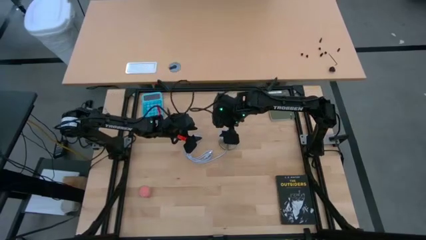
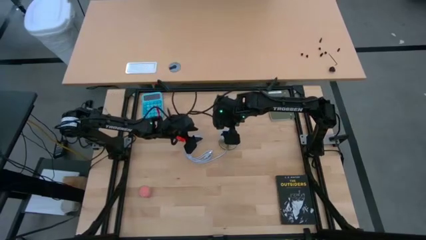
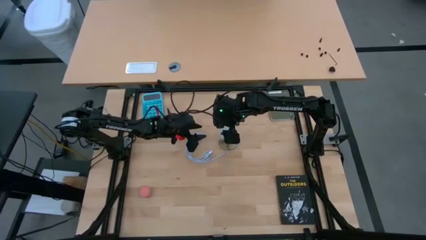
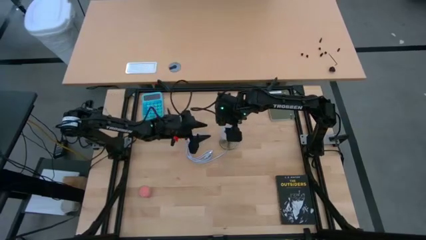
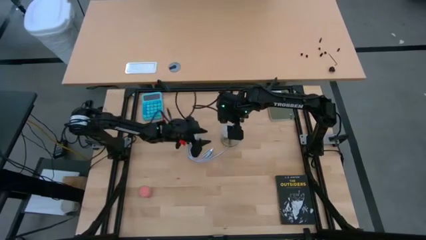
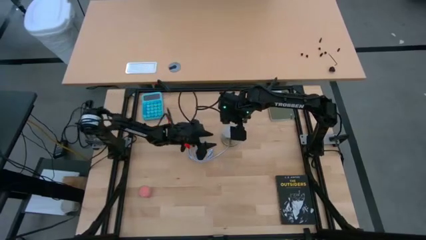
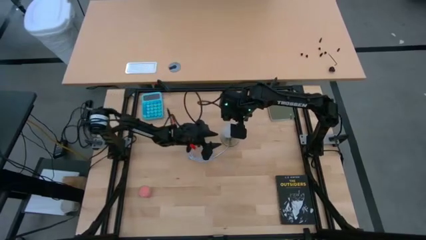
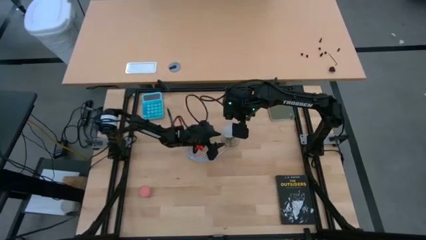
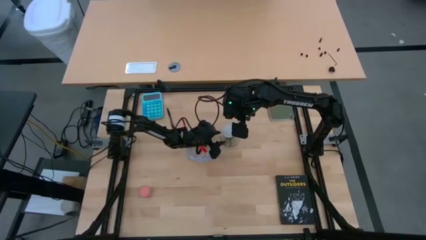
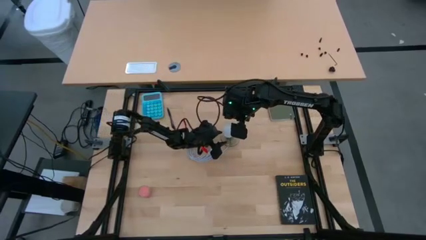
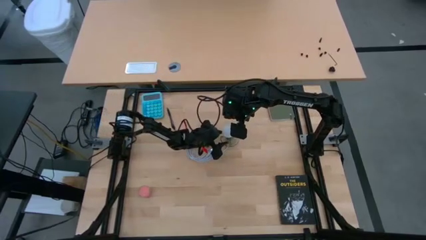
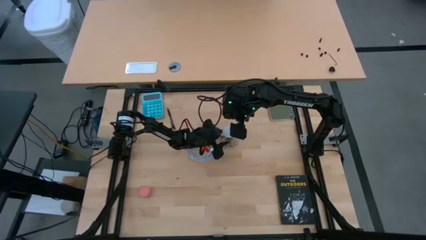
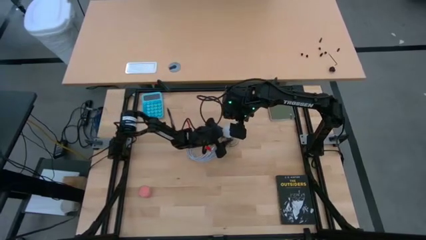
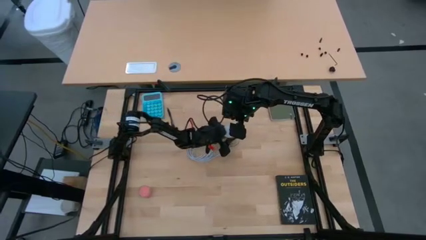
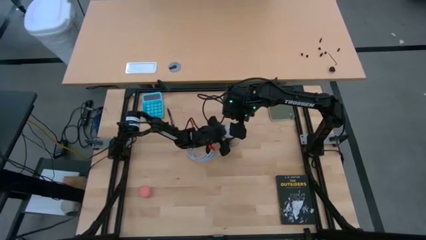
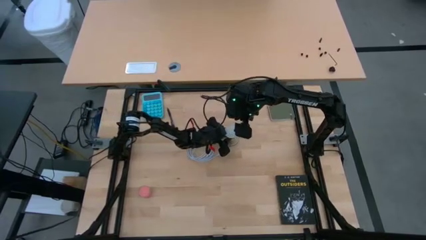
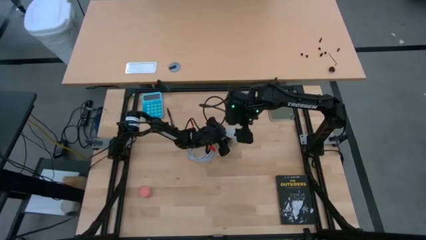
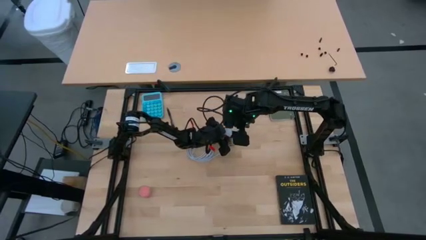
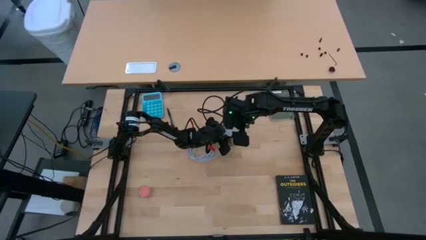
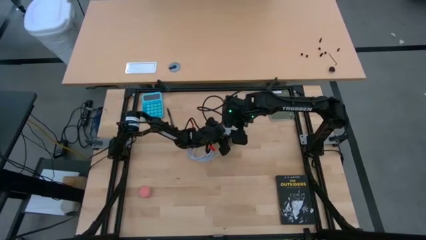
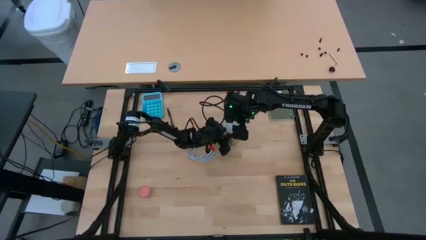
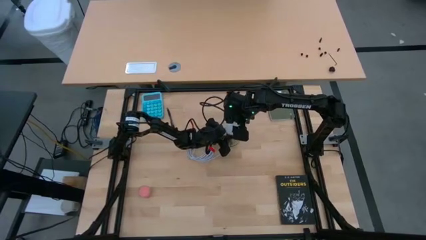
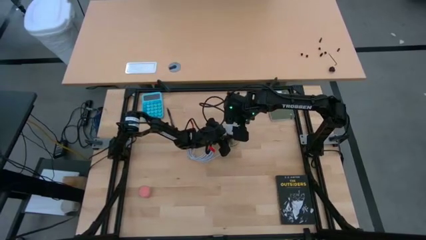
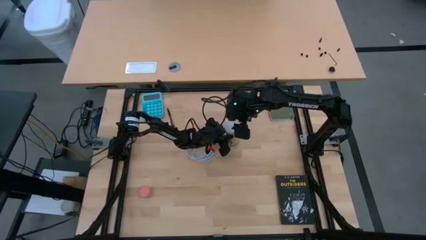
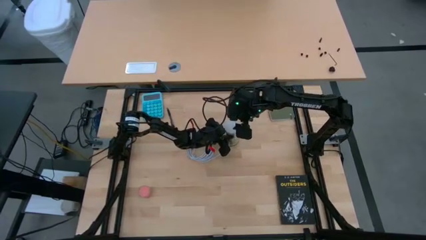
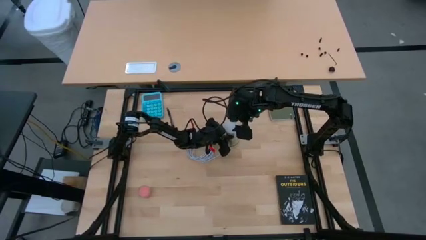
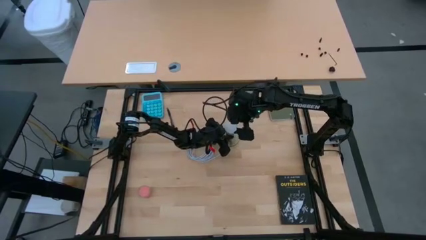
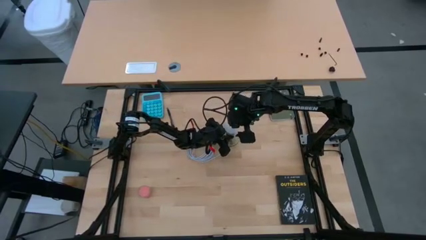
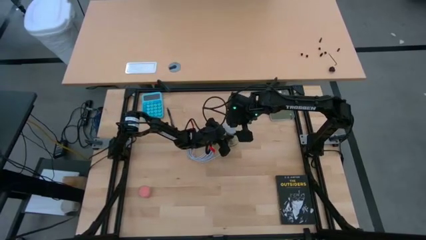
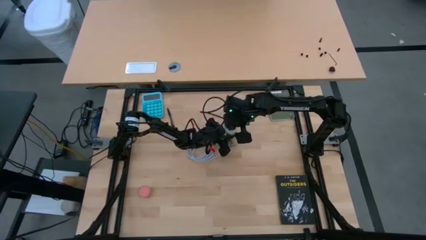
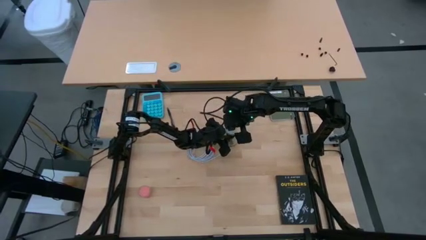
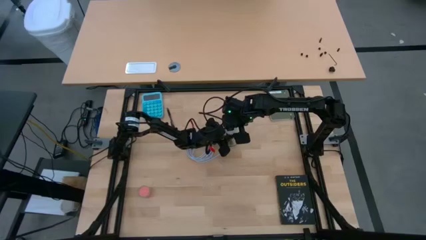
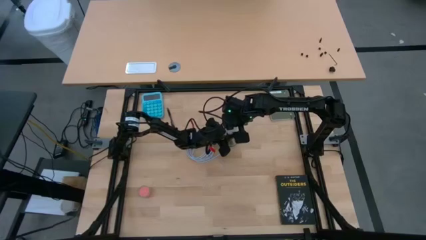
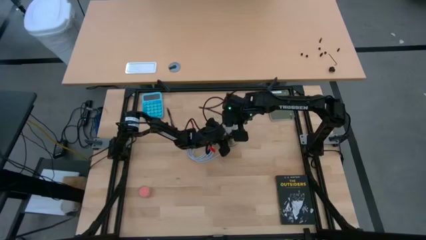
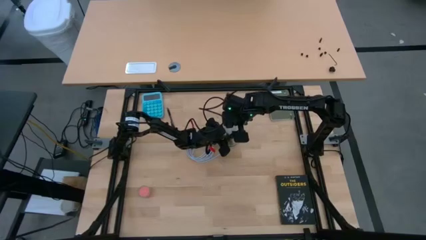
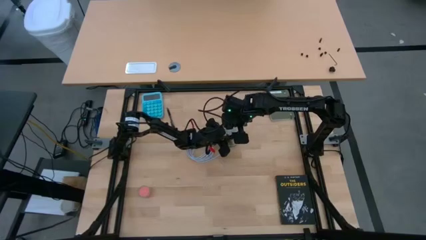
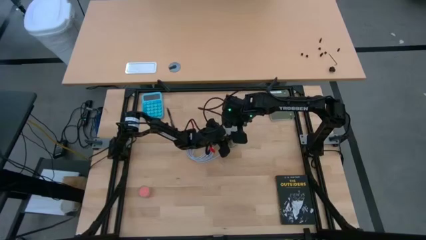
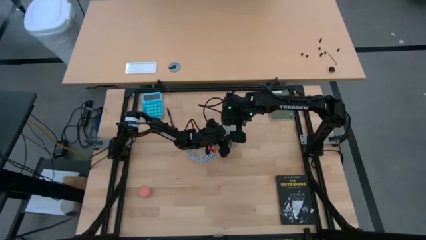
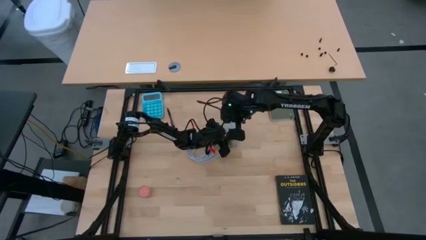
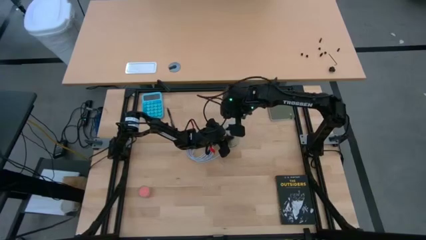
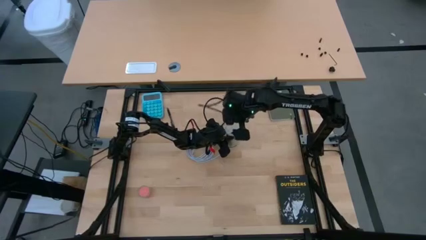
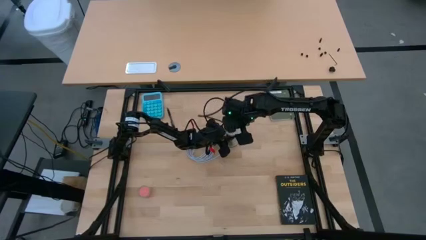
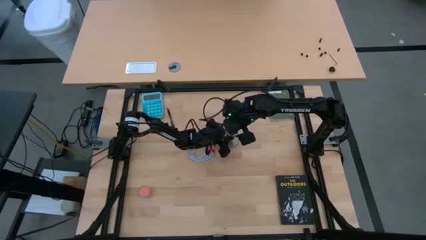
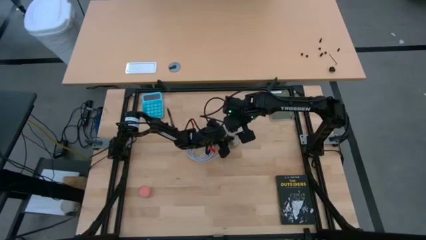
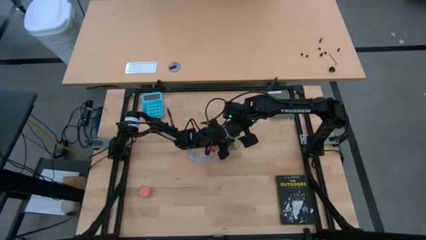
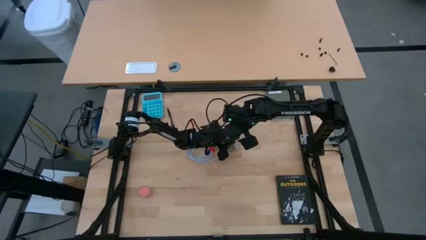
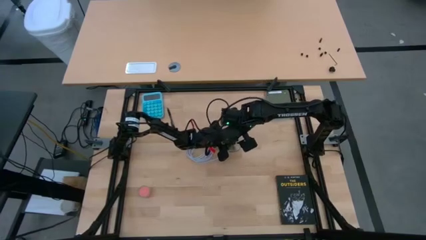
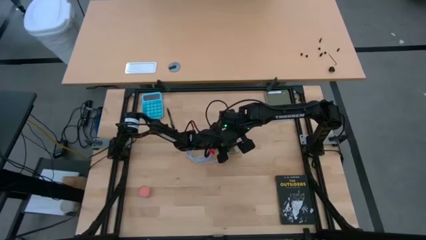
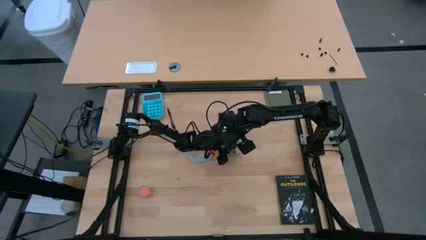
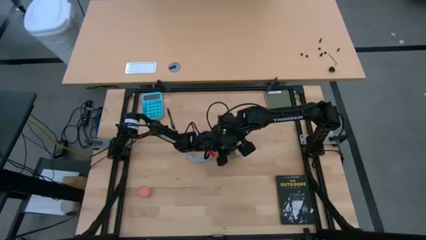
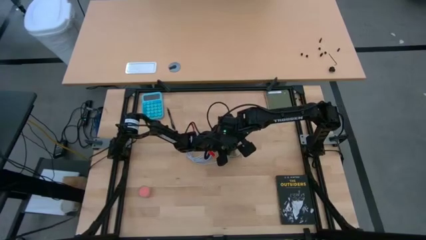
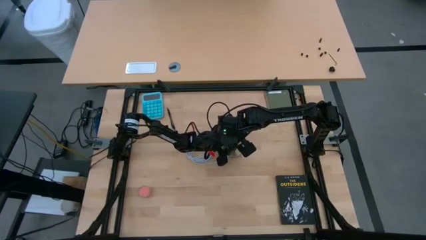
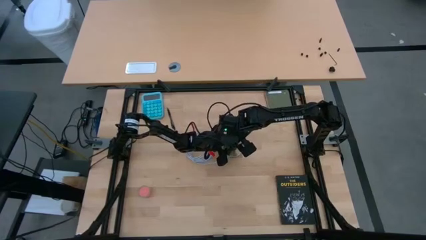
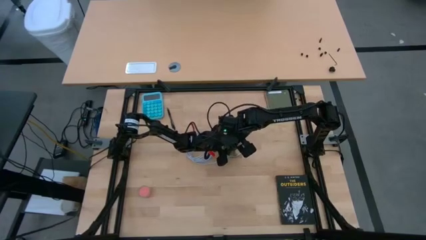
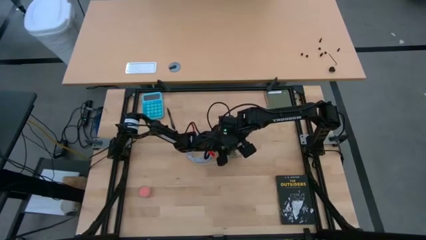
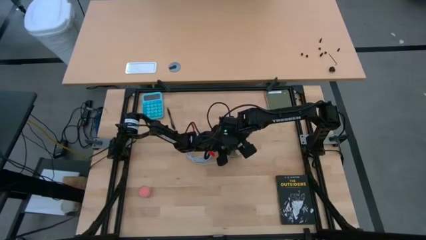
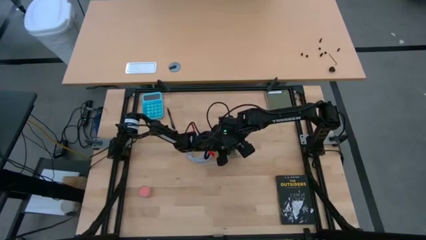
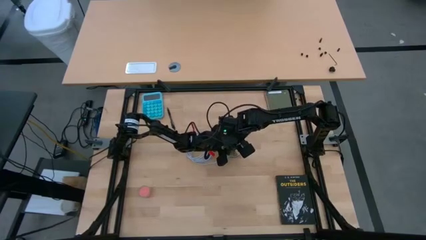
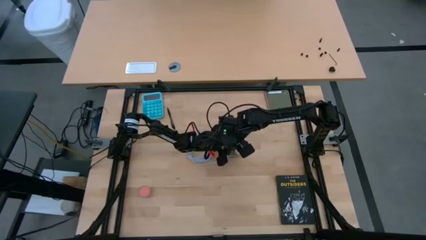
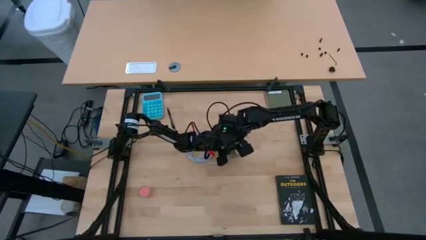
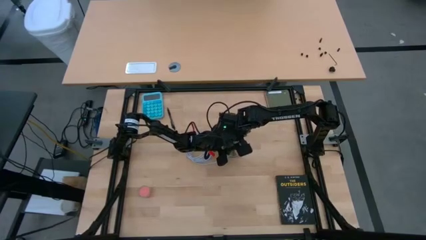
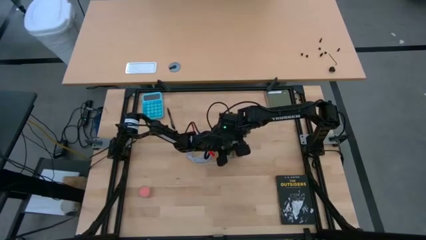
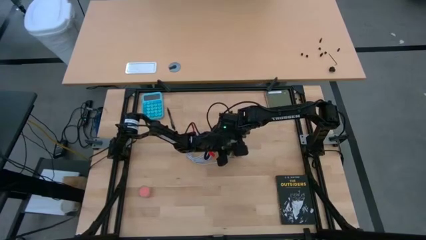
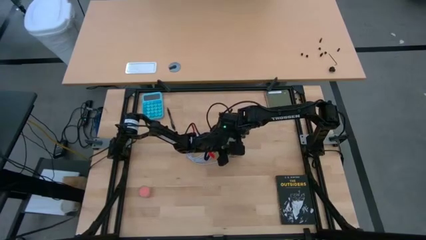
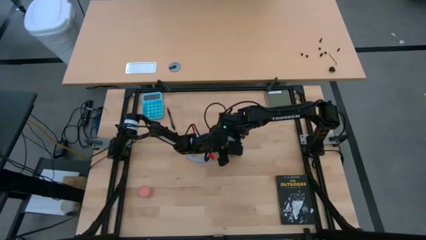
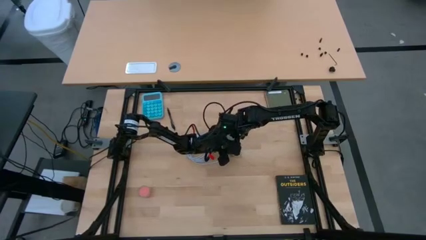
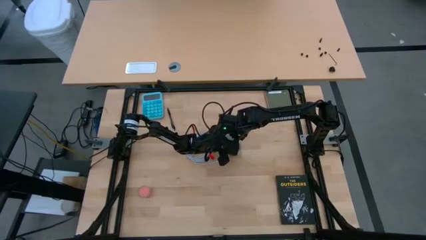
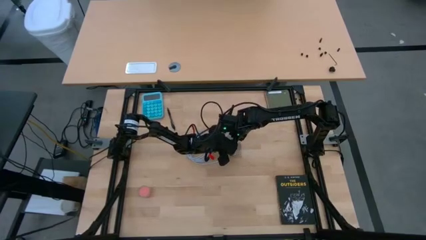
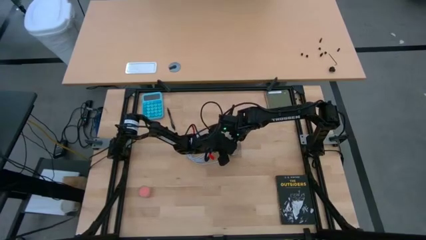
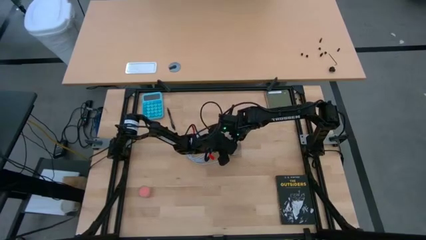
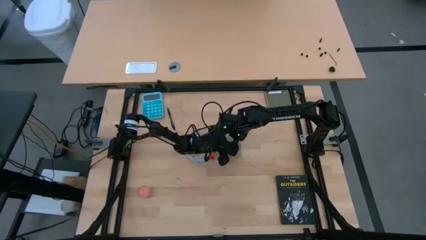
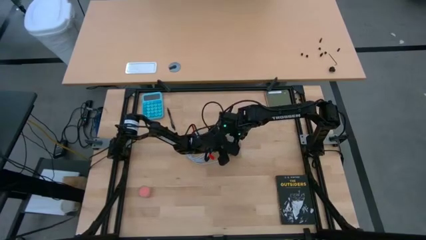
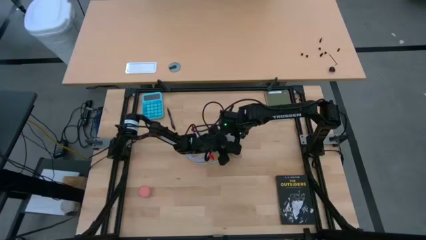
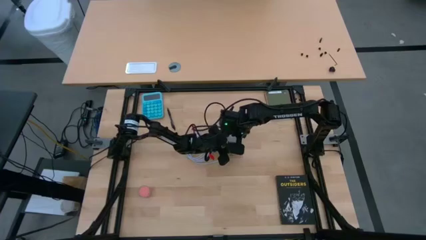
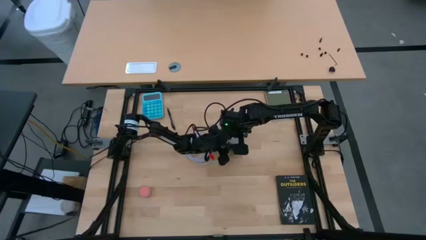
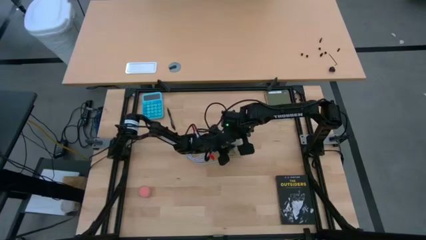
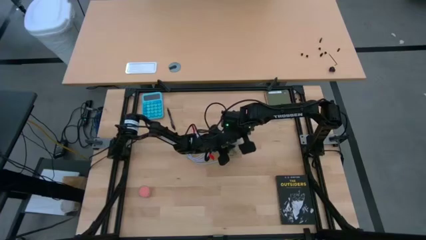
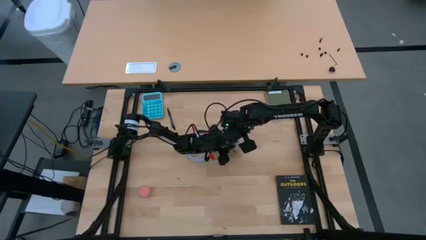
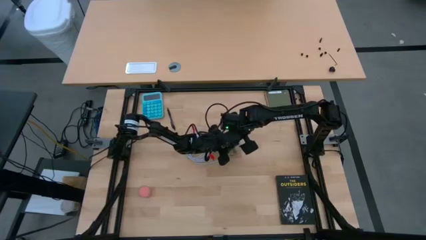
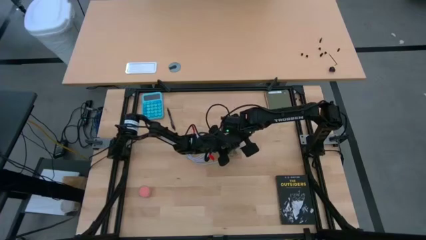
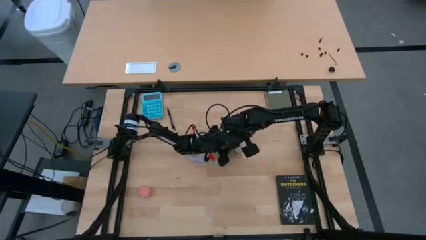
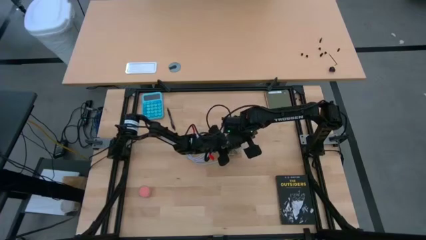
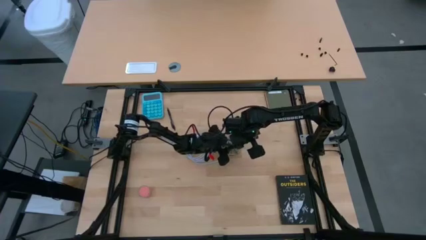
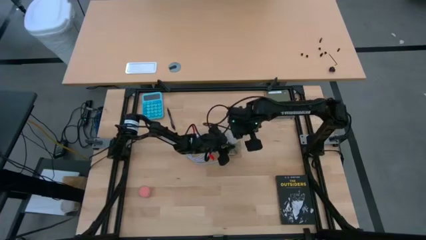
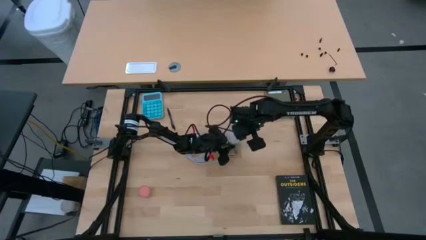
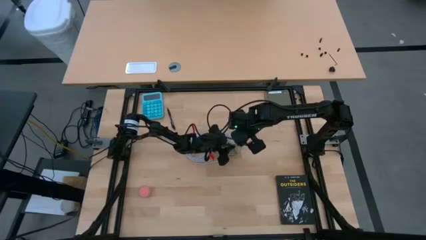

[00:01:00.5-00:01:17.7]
Task: Screw lightbulb
Insert the white lightbulb into the desk lamp
